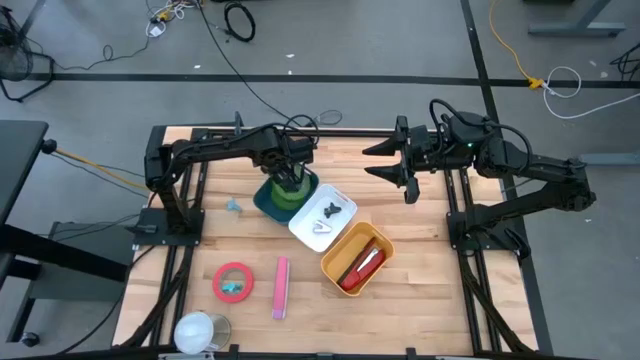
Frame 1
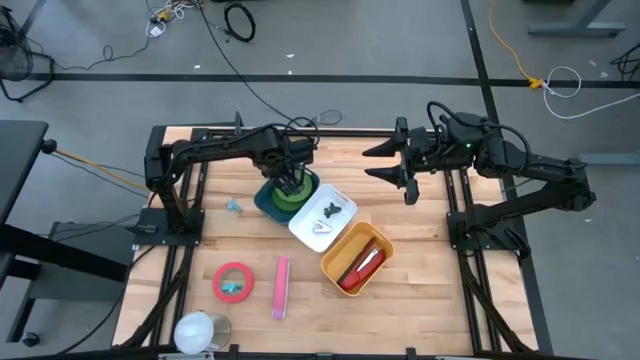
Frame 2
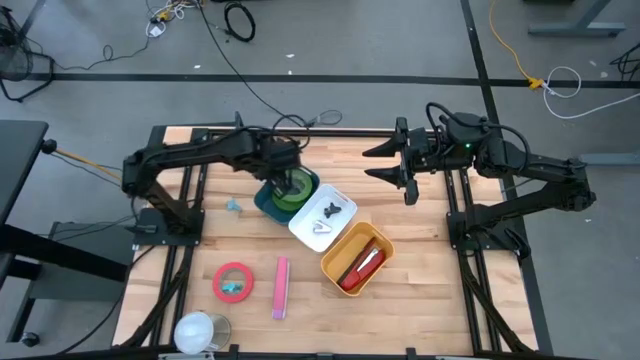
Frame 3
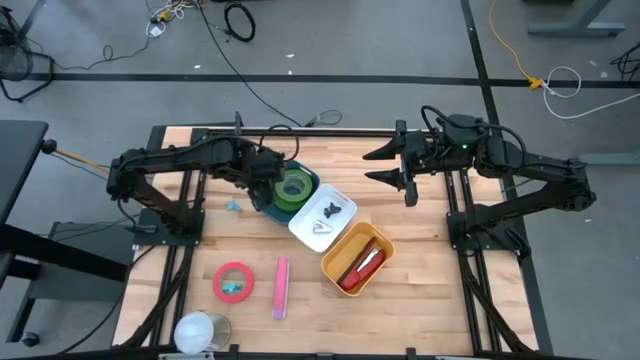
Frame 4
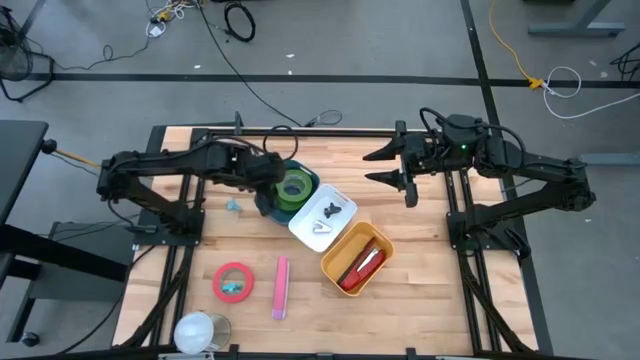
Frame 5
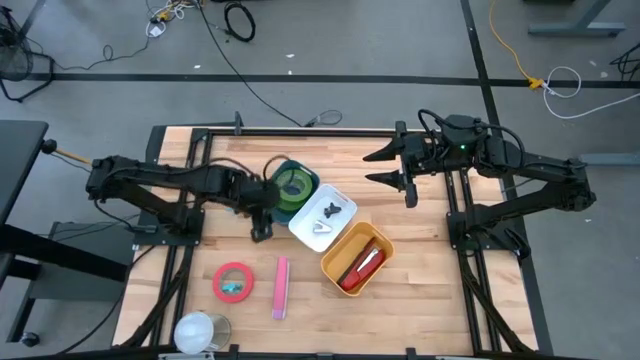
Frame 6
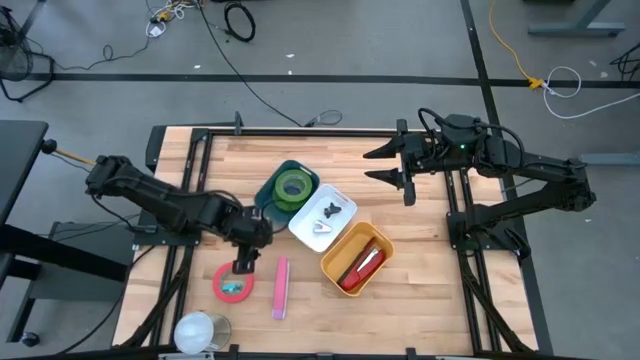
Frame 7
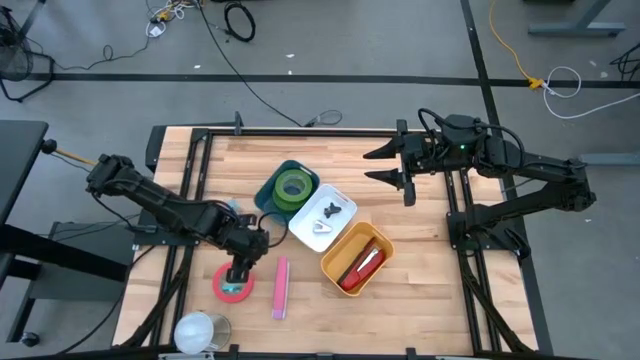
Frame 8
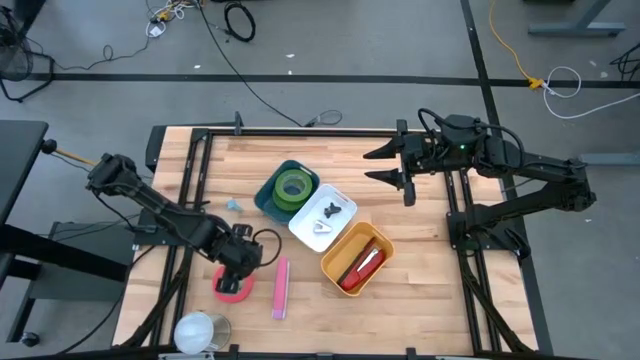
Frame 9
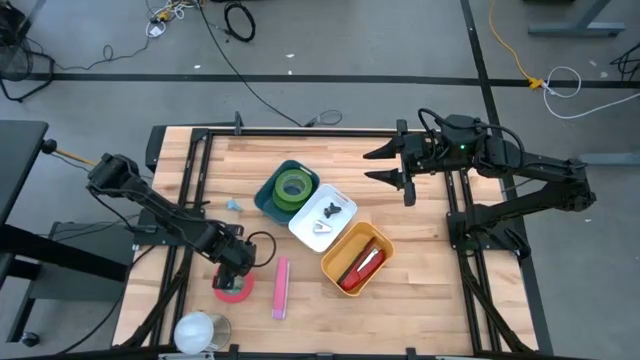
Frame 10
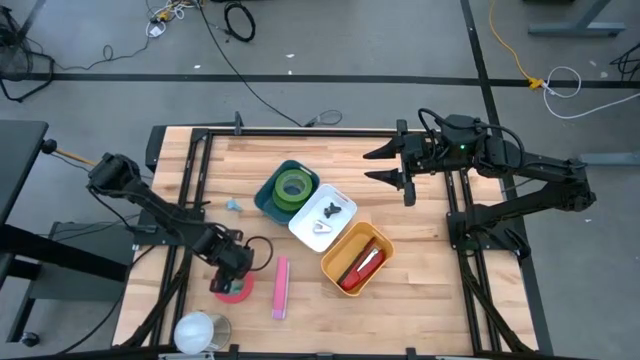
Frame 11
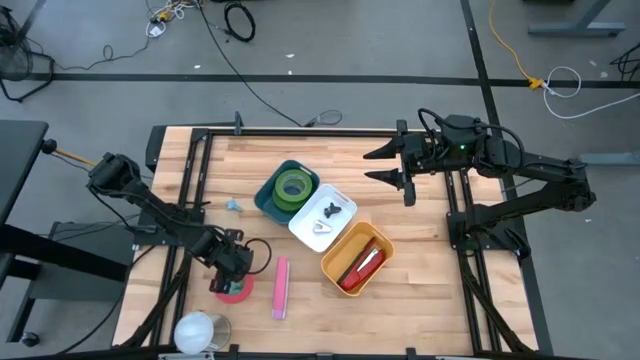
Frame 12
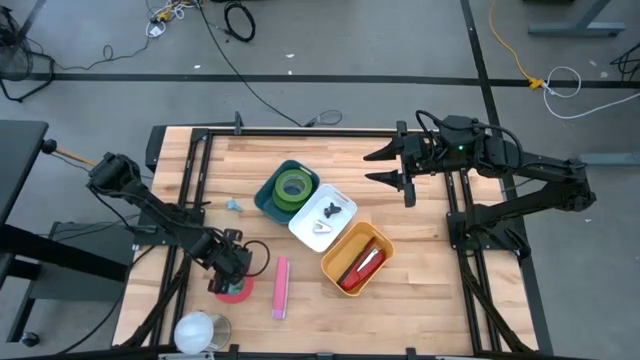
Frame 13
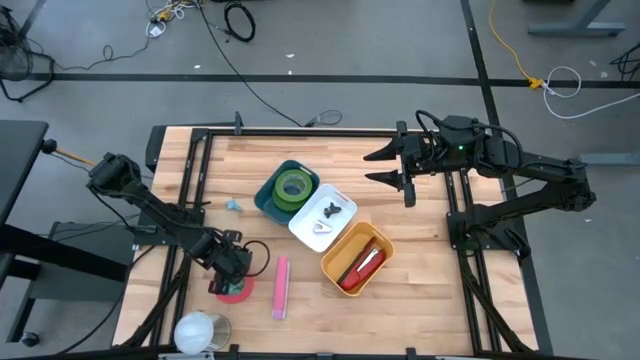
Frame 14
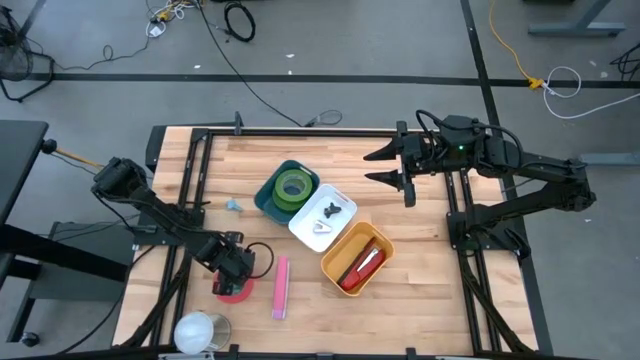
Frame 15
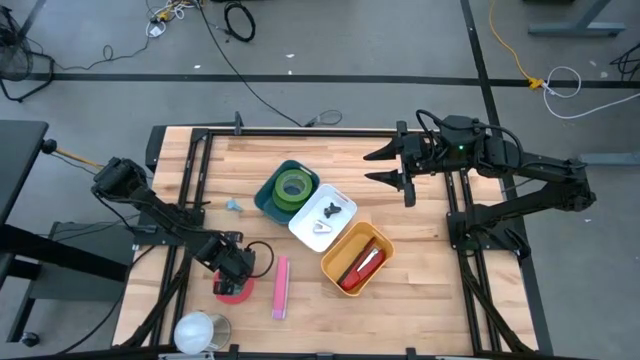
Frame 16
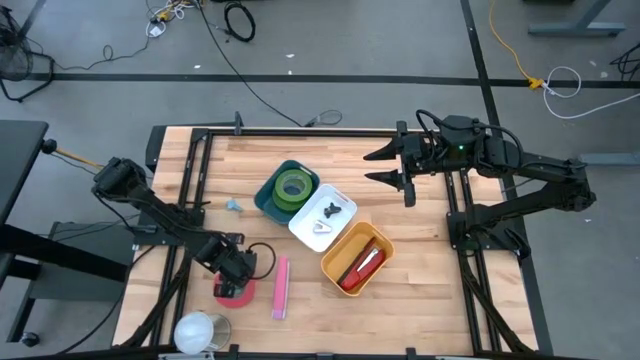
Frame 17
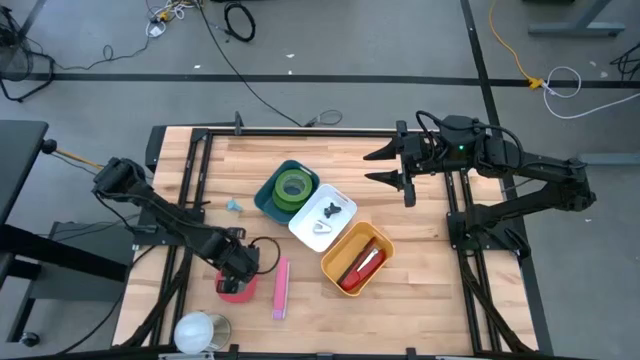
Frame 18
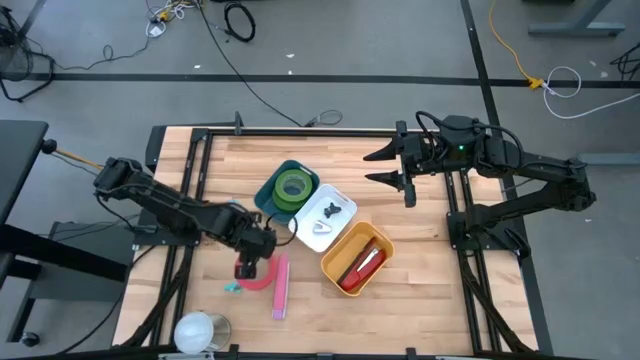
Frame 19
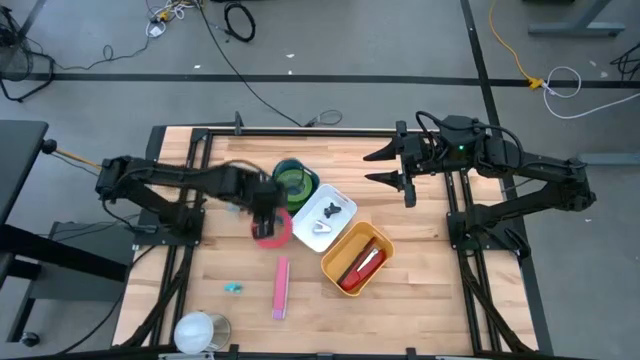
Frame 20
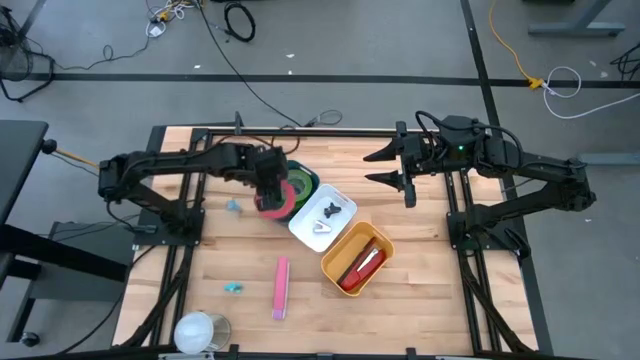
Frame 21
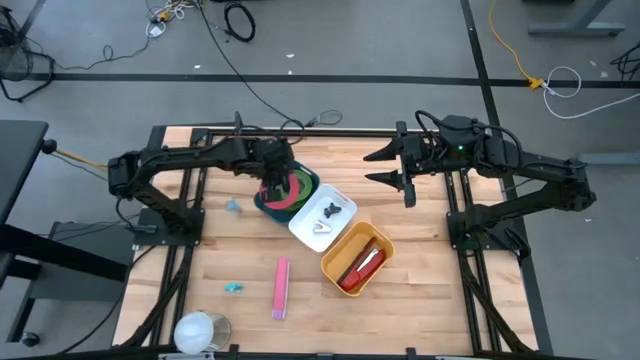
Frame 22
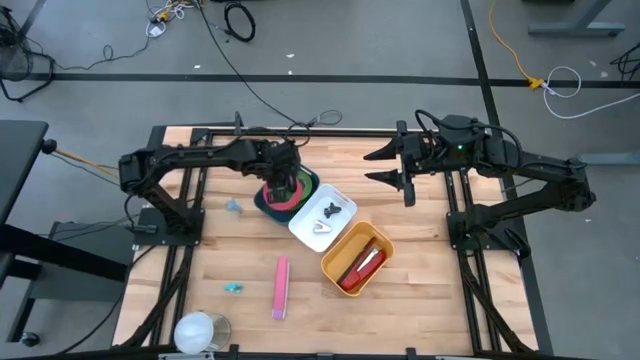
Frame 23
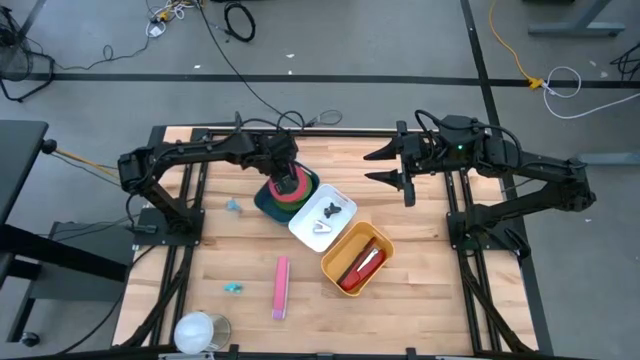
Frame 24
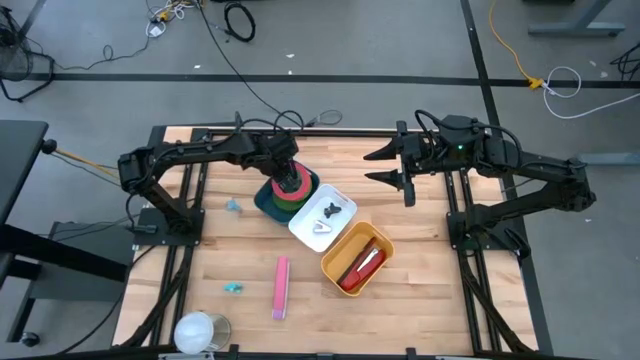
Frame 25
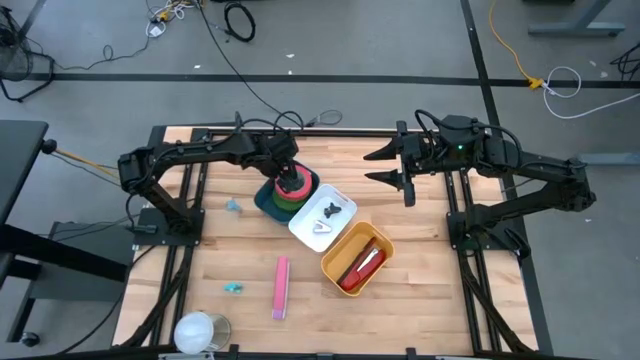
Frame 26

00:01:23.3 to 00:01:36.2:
Task: Pick and place Stapler, Stapler remover, tape
Stack the pink tape on the green tape

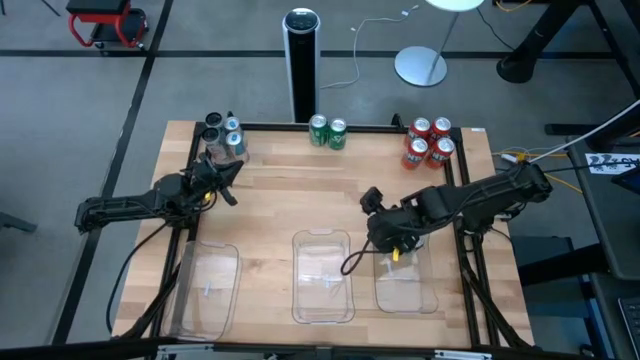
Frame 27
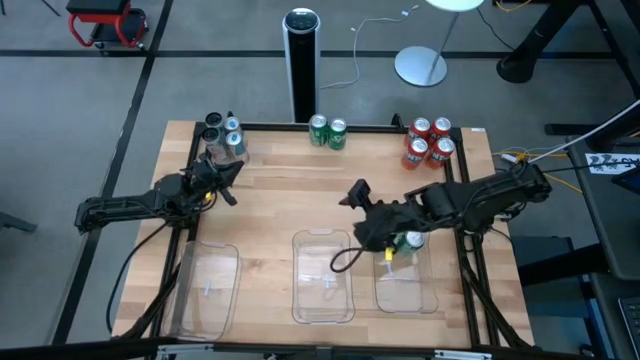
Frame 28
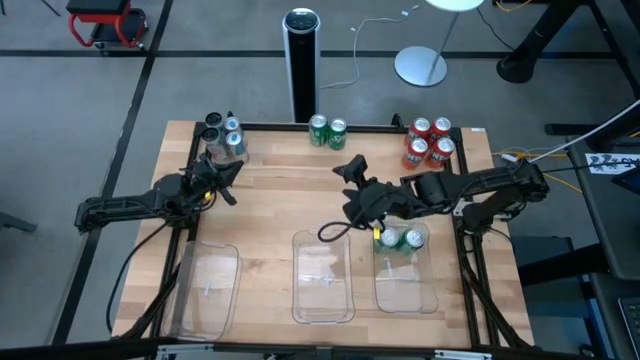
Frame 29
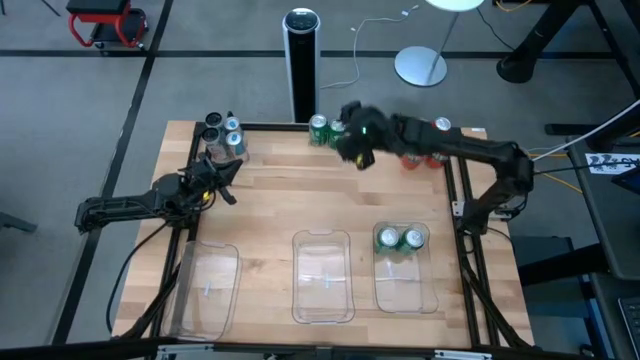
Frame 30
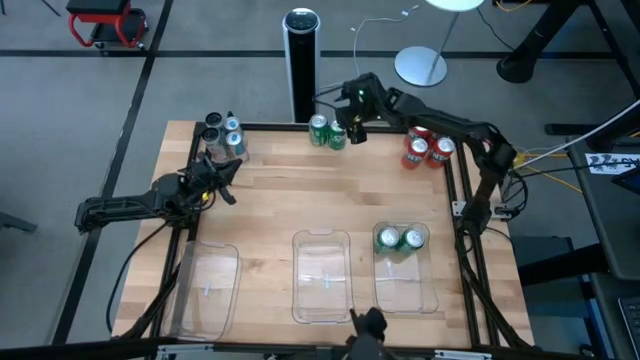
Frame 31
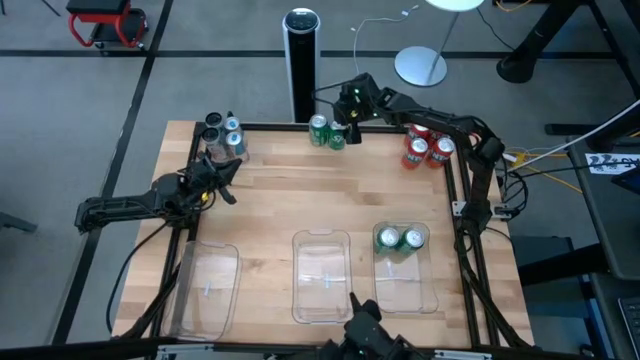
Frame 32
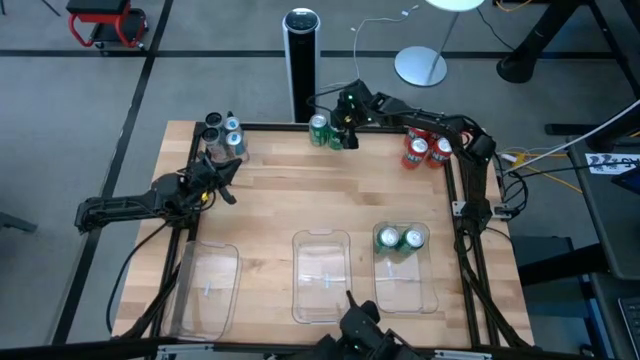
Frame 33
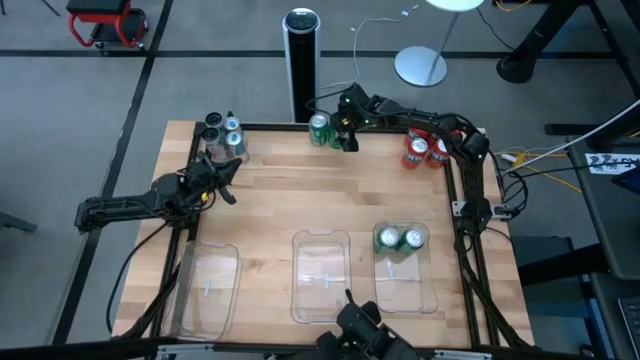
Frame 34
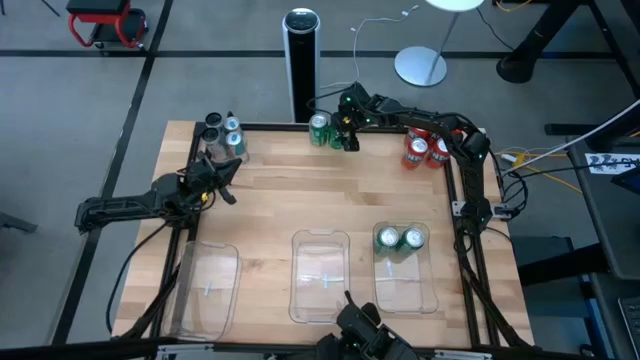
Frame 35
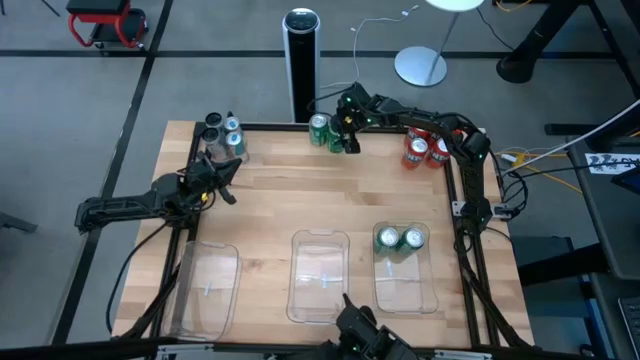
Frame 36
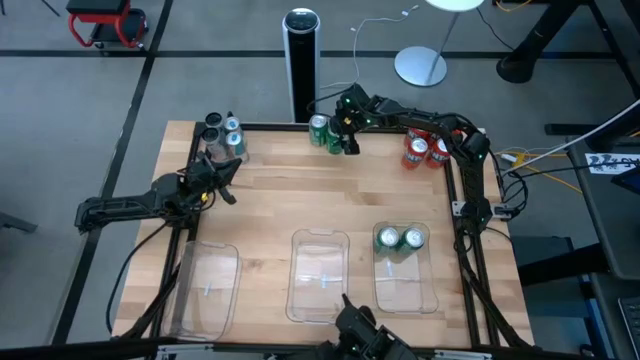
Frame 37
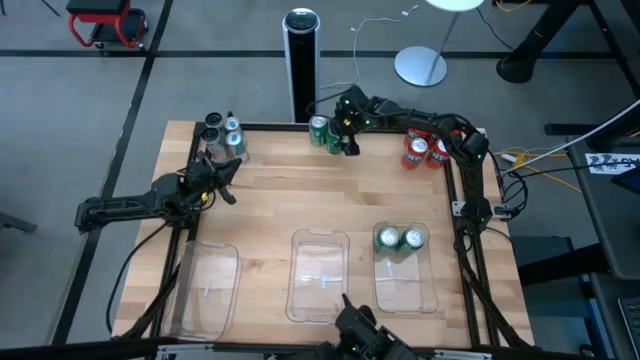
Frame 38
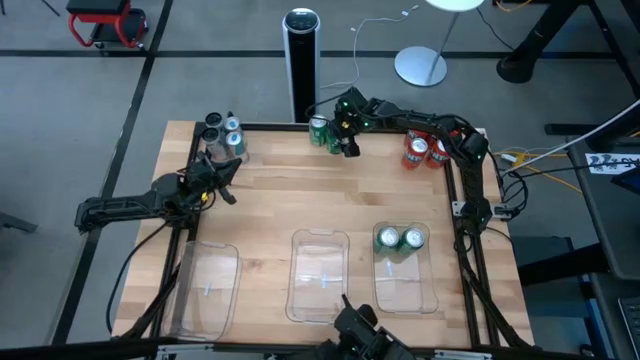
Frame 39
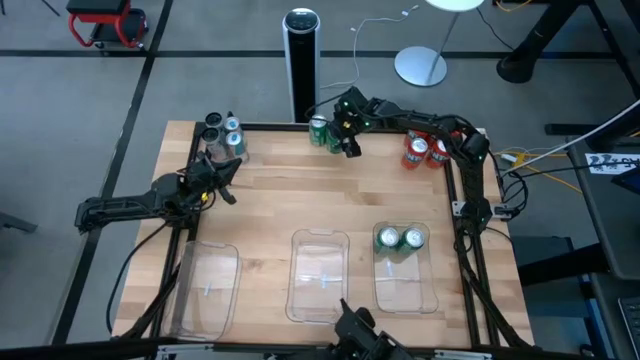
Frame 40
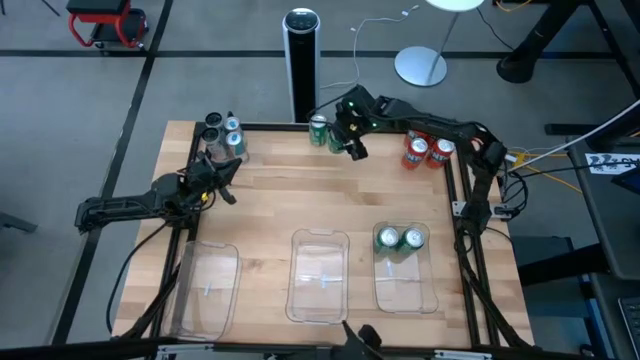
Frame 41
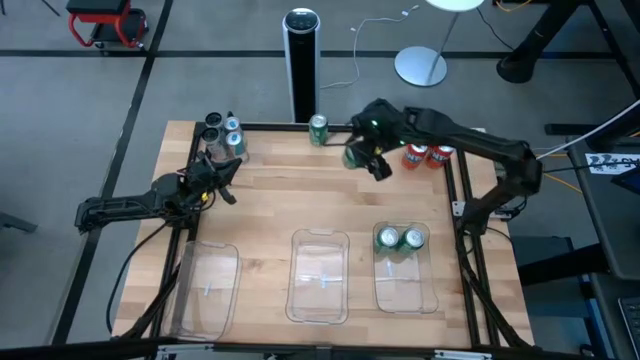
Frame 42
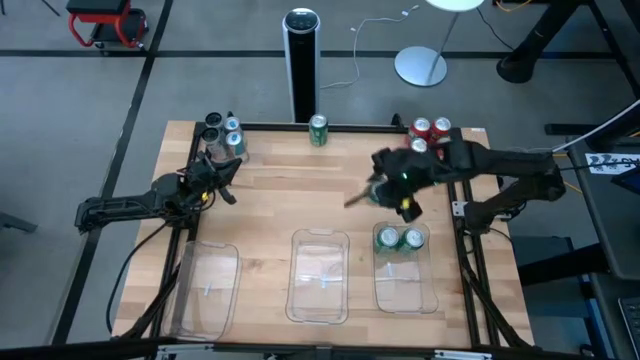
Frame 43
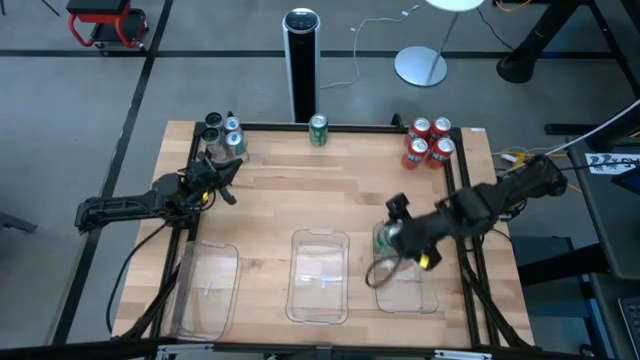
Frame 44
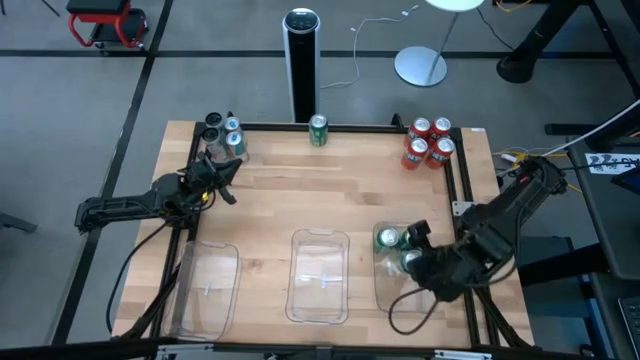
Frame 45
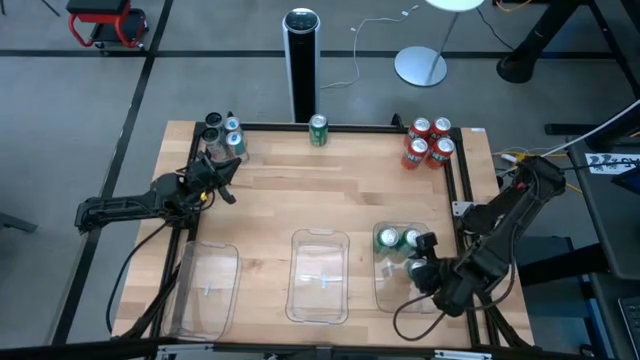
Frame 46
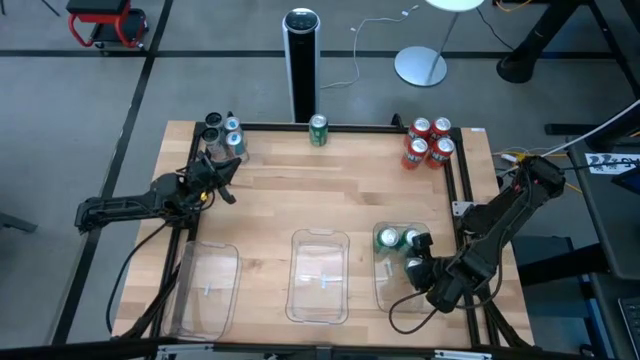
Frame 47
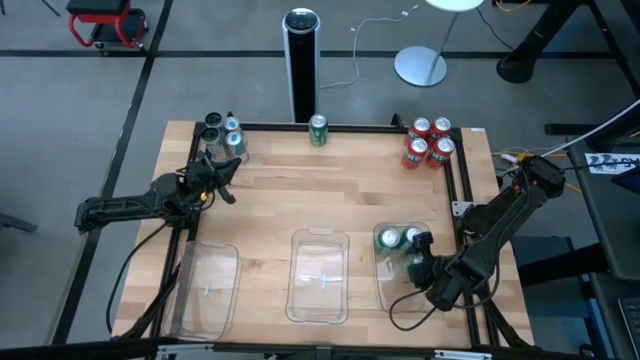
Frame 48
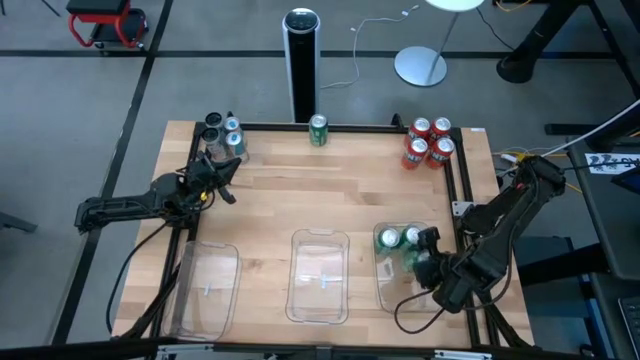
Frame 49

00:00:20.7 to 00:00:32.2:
Task: Sort soda cans
Put the right green soda can into the right transparent bin
